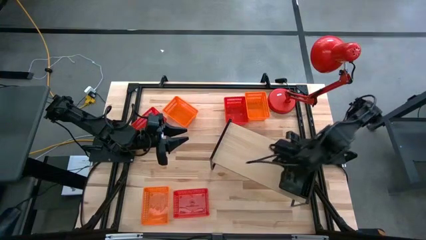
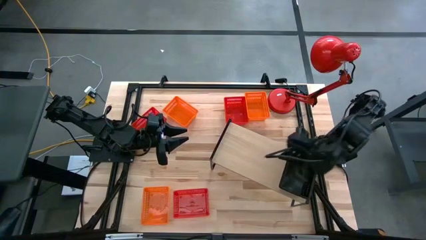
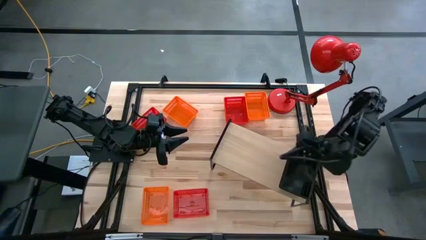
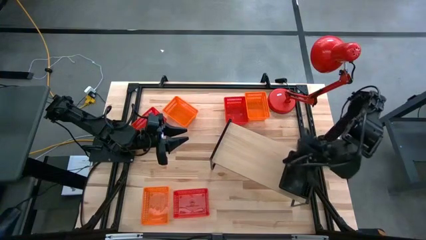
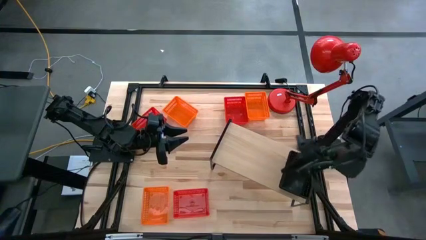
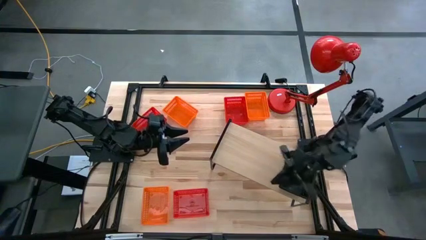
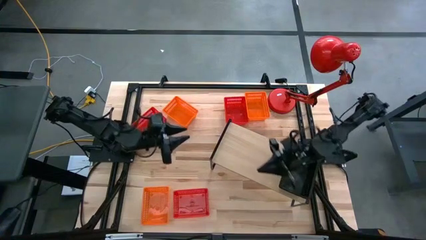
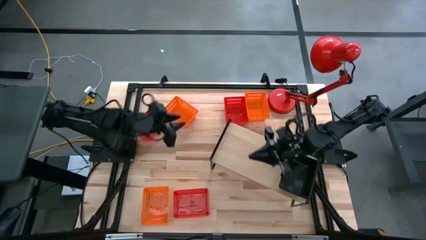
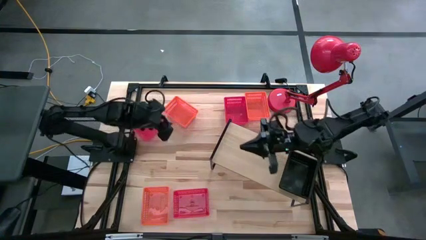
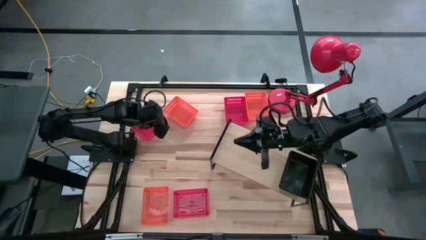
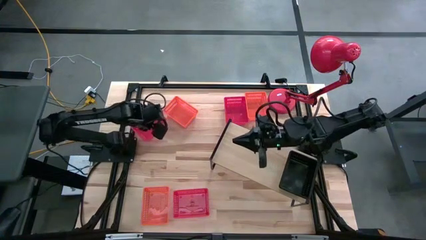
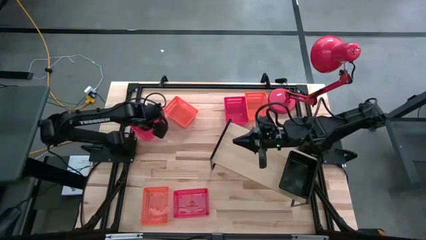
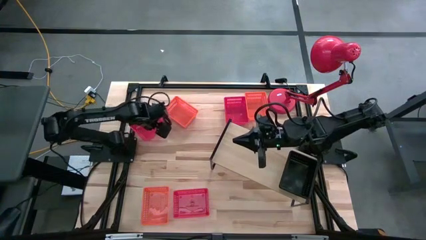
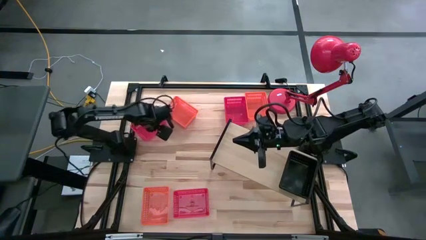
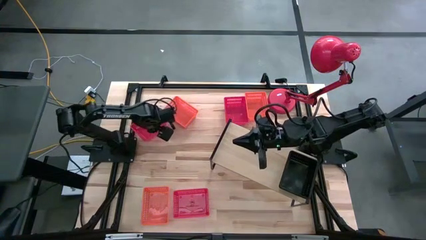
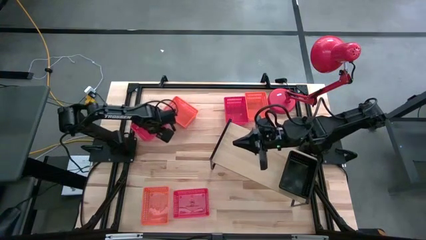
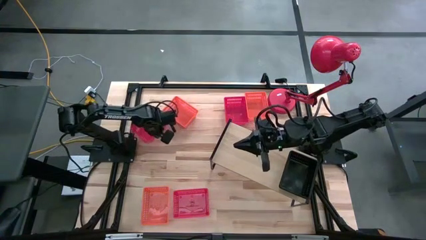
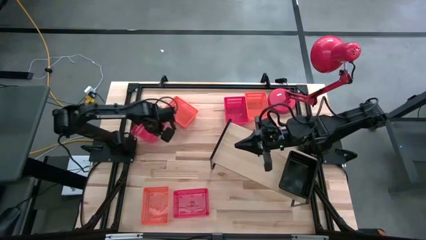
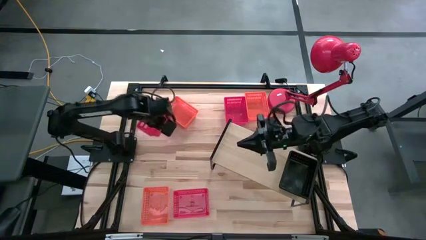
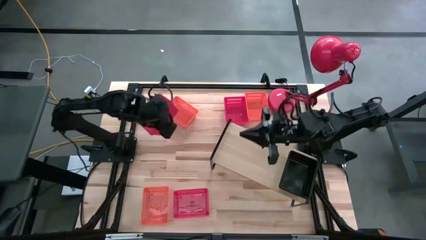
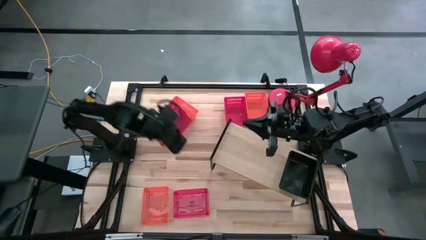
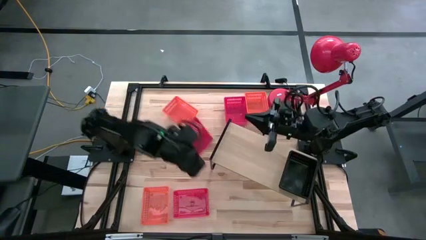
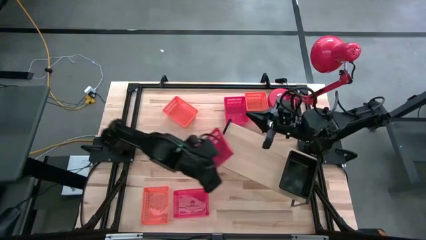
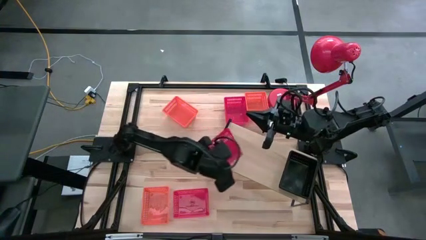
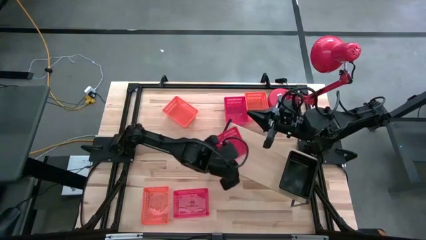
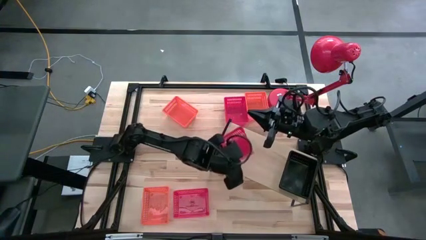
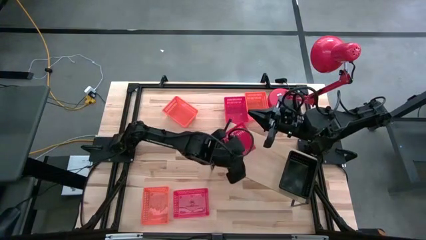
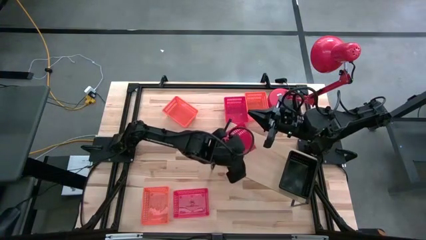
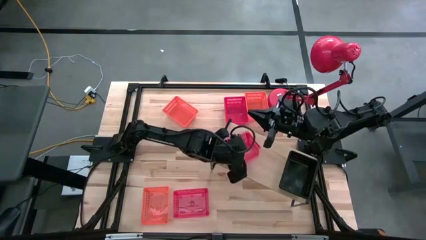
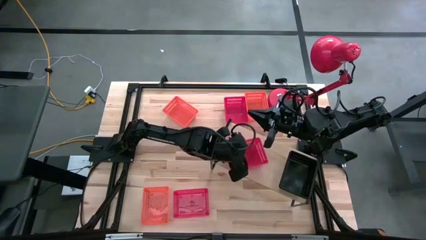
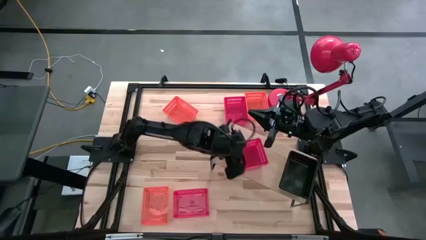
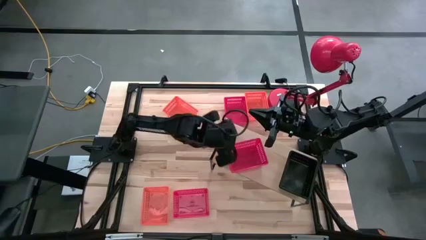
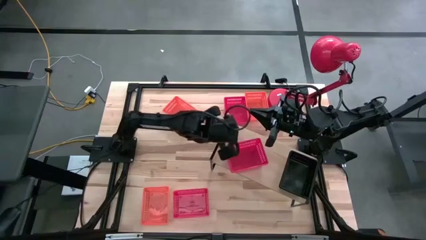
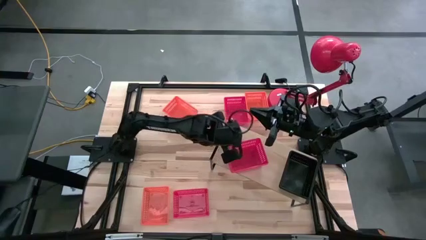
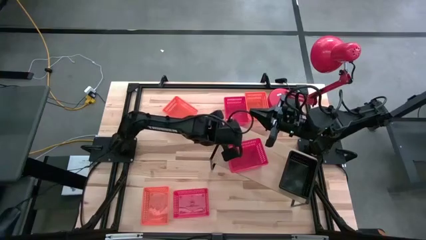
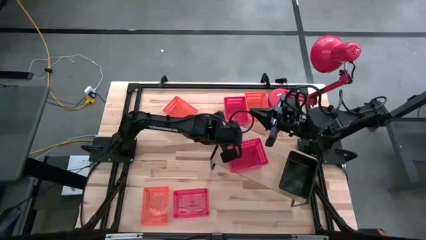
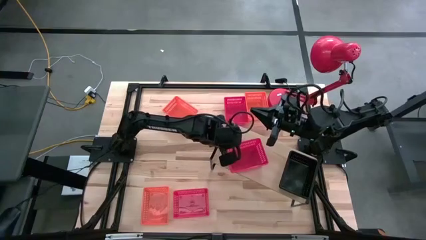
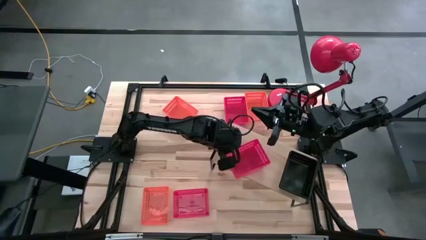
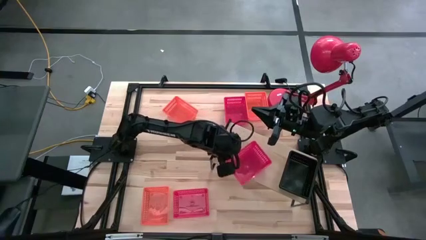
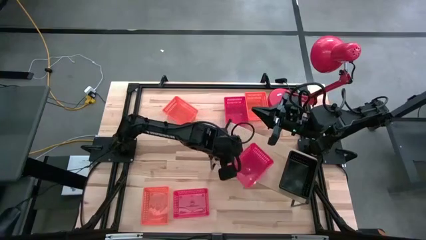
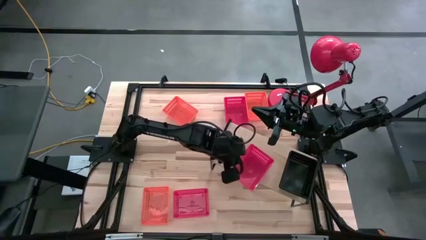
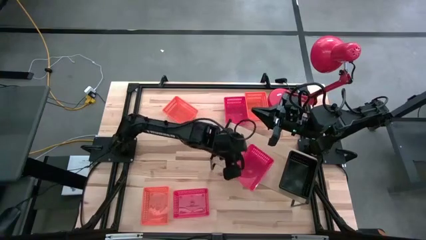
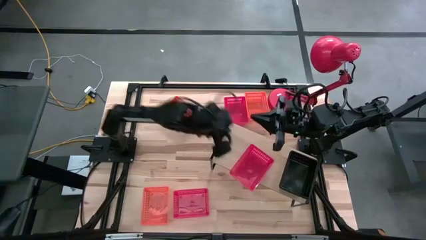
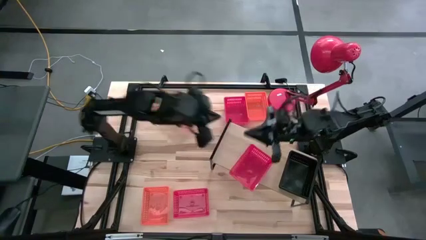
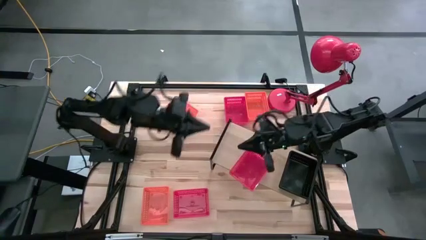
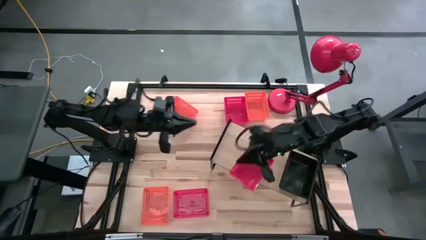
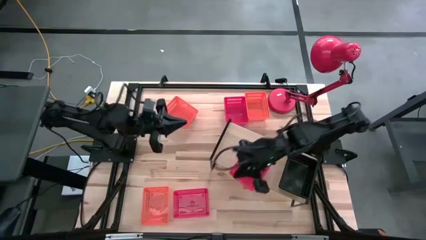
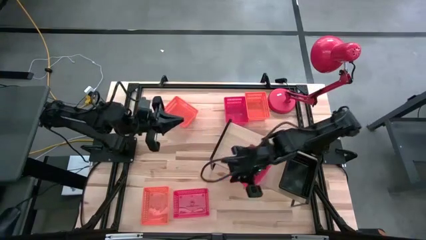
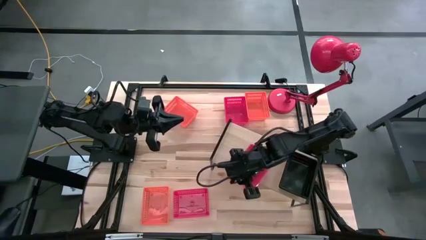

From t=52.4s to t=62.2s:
Task: Stack baskets on shelf by color
Put the top left red bin on the shelf
